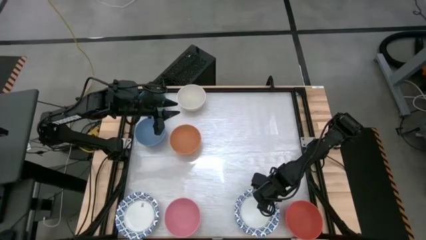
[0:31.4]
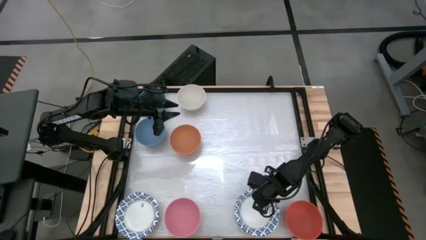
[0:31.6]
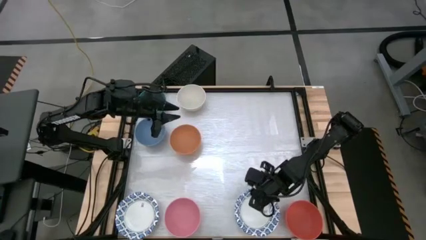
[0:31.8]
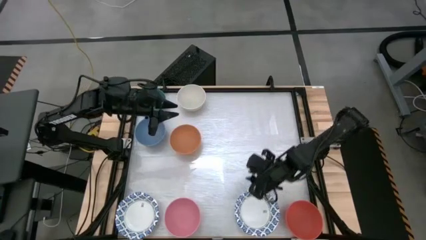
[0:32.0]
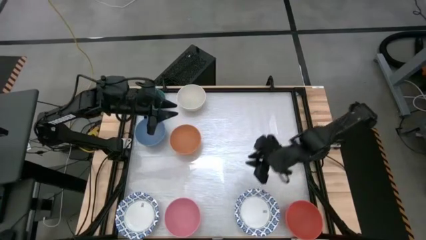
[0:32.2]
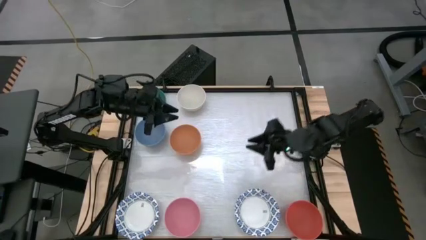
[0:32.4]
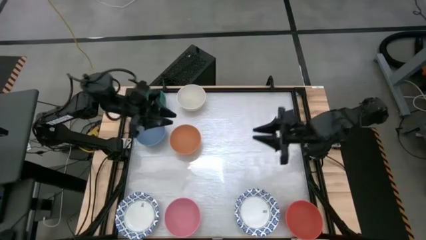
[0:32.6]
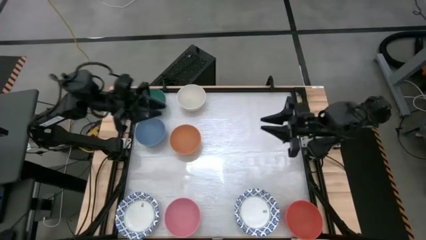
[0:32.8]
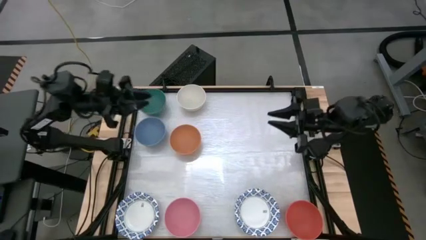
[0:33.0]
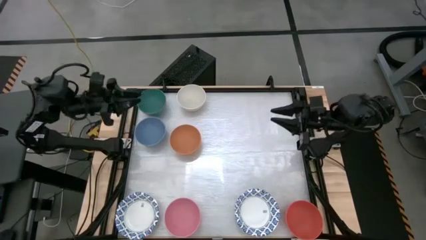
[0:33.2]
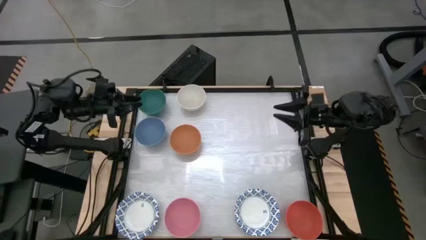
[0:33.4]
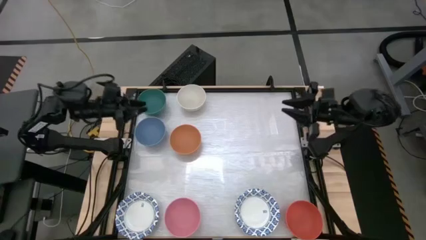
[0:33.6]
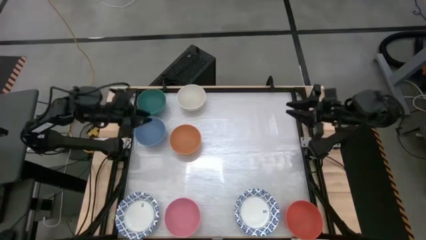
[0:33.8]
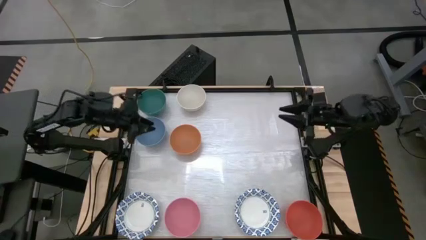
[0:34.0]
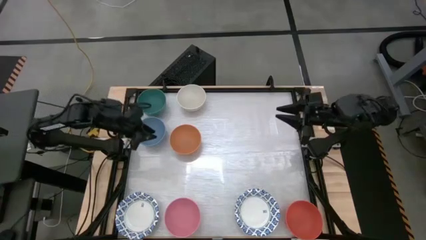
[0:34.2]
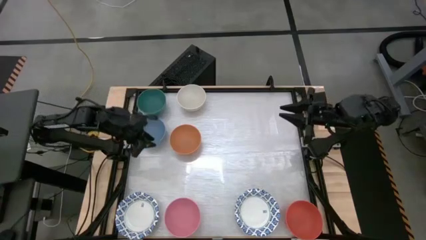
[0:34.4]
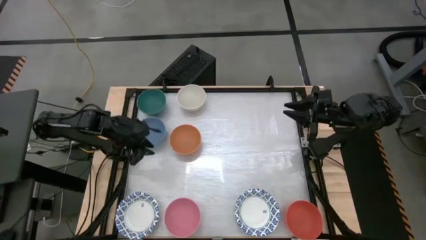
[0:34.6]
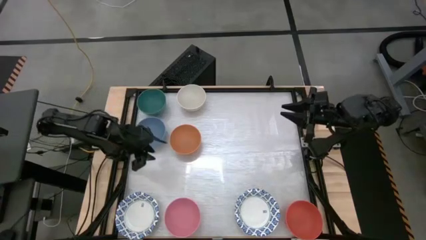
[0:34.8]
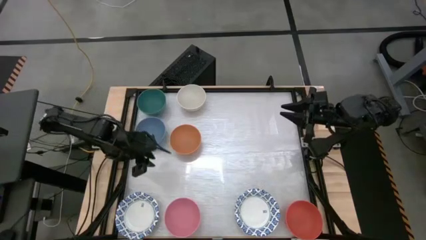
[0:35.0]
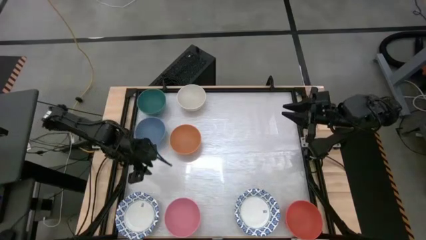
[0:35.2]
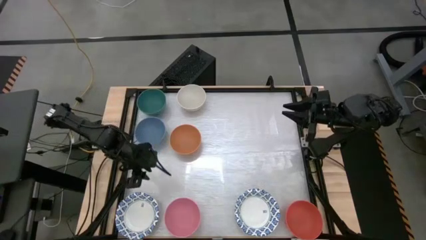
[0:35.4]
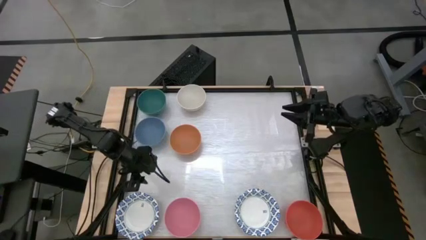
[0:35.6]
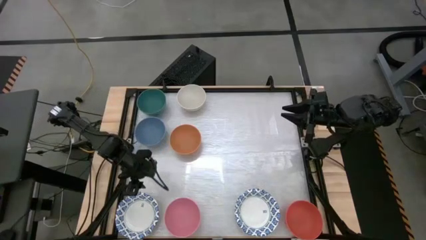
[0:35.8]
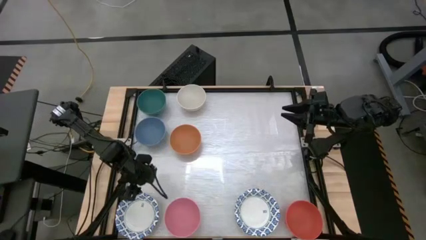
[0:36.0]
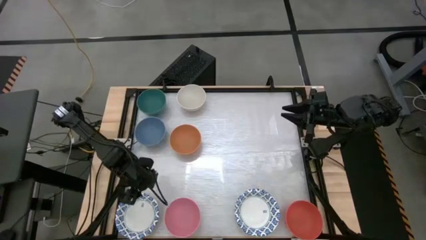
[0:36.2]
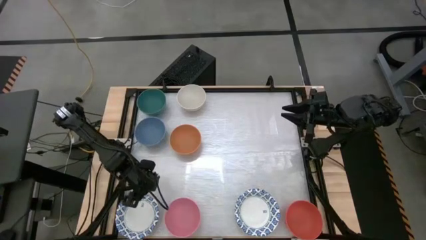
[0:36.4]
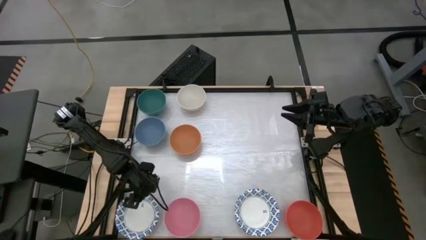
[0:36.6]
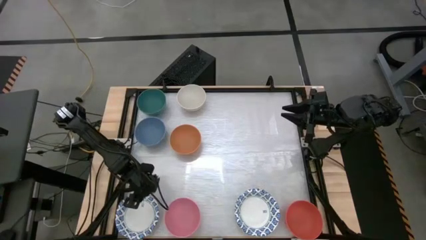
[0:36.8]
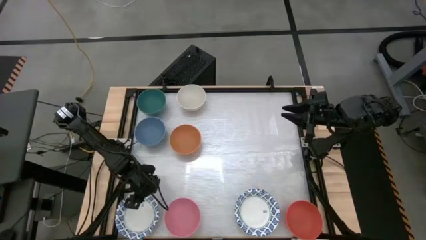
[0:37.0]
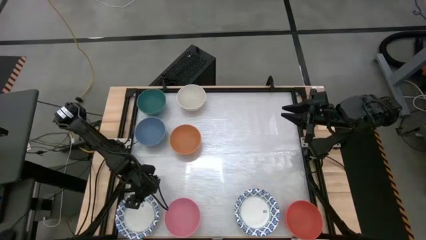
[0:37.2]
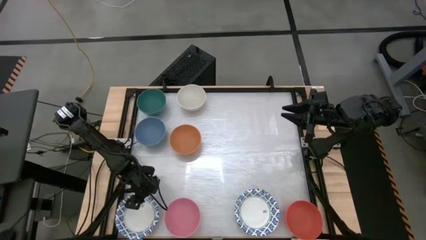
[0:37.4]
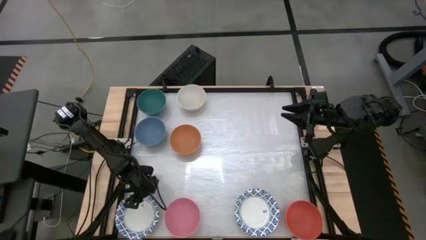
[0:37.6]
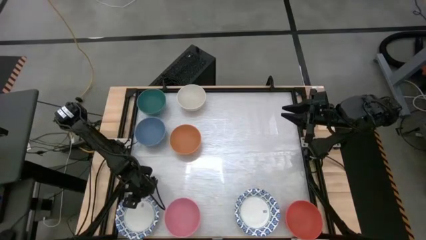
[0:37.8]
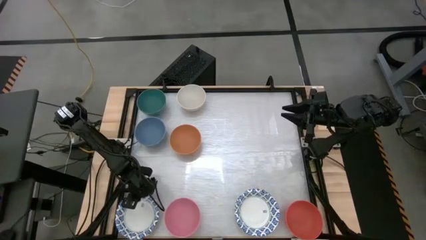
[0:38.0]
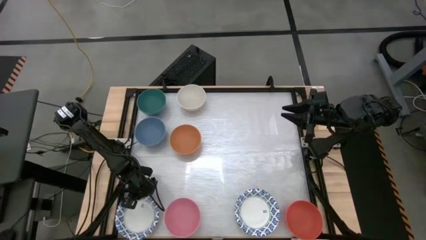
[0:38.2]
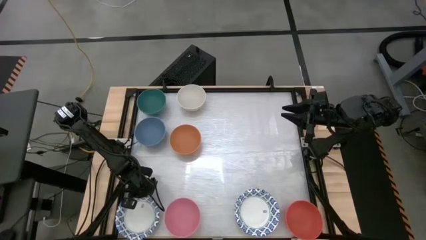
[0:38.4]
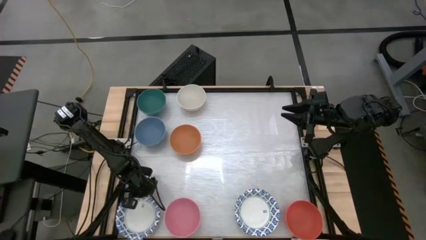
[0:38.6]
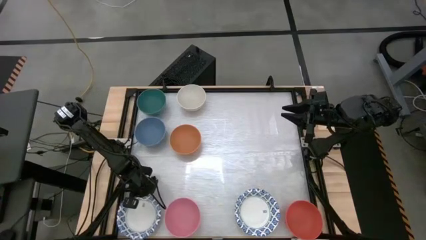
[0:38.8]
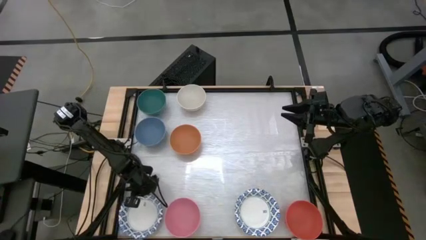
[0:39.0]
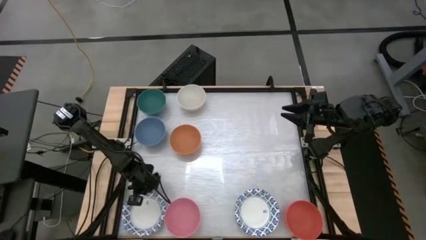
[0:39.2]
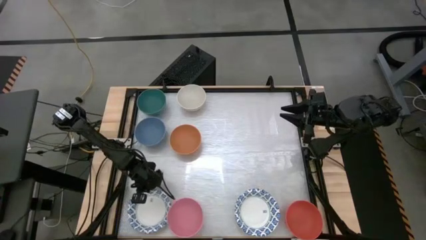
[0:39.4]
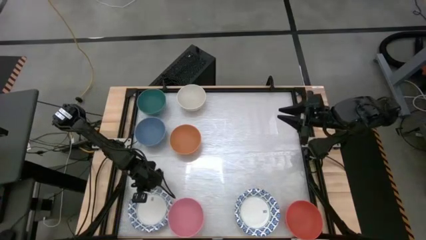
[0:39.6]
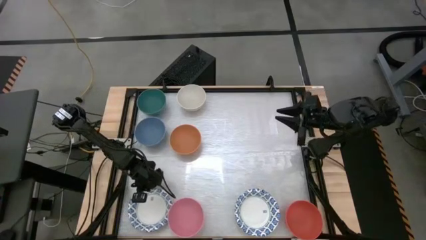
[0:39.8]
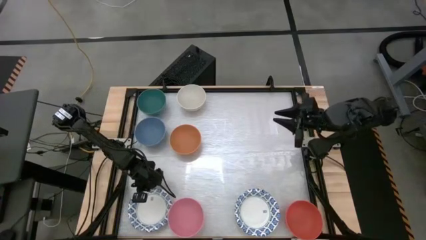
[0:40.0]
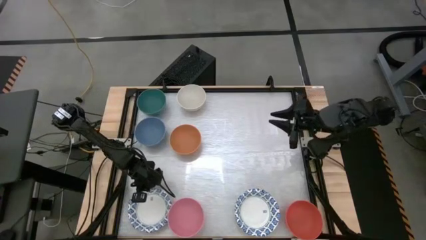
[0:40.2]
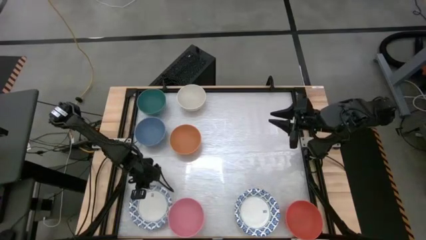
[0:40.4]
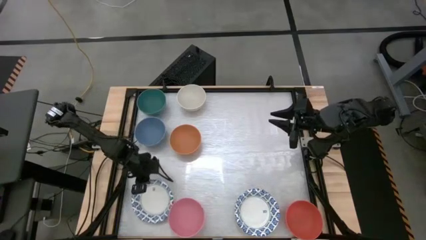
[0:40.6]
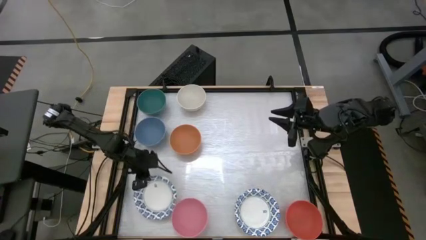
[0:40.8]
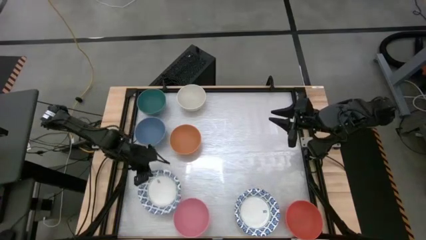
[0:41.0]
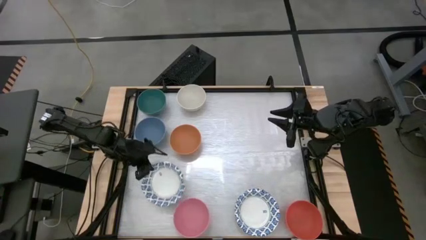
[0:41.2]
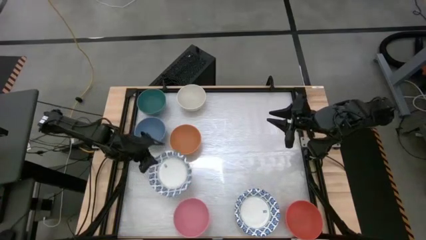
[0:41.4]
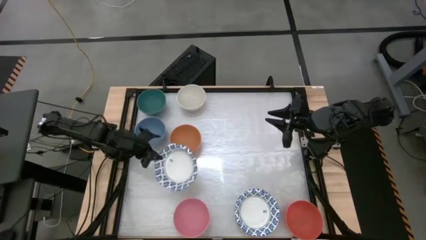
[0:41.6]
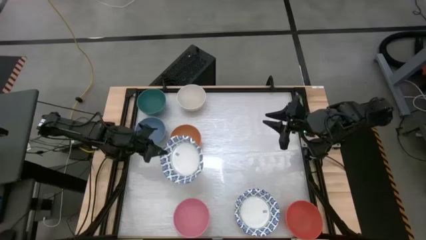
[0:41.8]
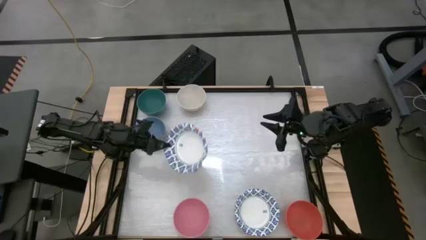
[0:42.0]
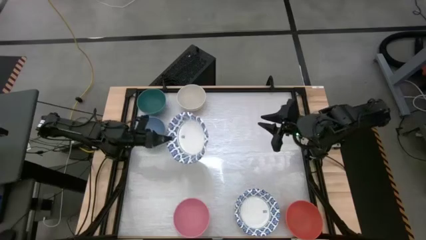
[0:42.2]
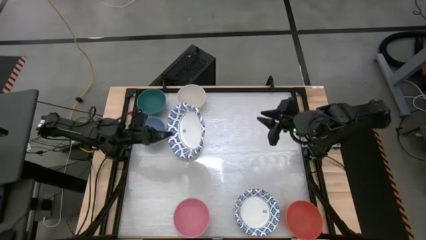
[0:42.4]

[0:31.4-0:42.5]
Stack the left white paper bowl on top of the right white paper bowl

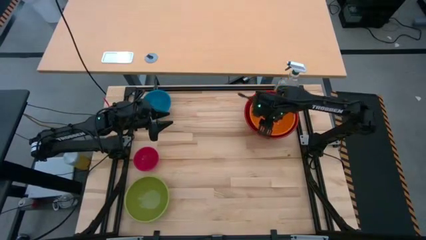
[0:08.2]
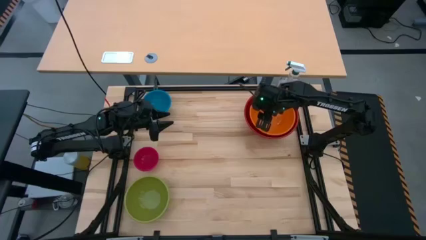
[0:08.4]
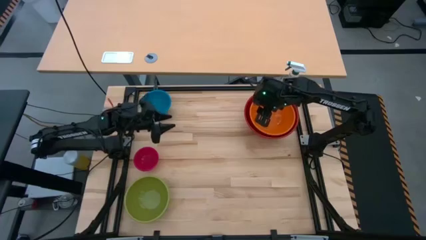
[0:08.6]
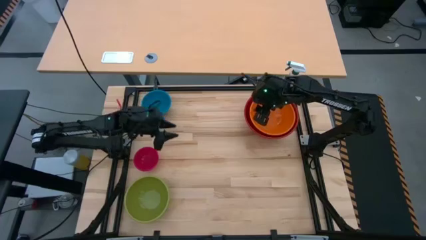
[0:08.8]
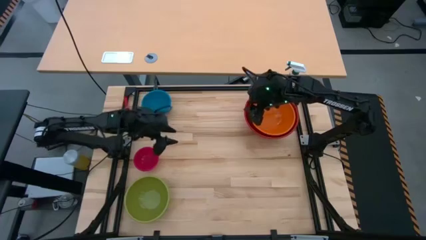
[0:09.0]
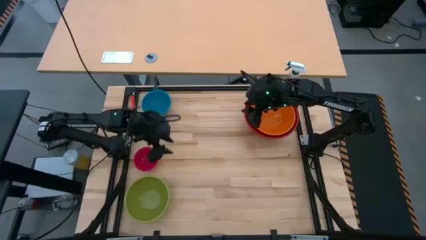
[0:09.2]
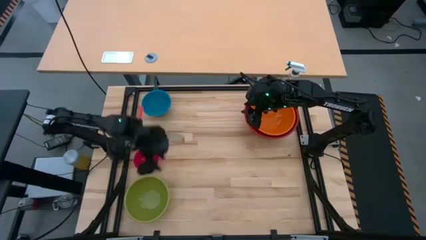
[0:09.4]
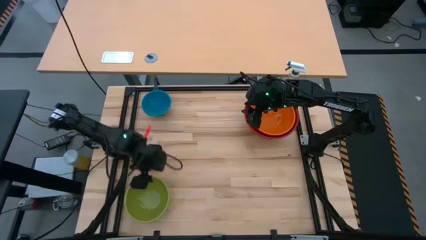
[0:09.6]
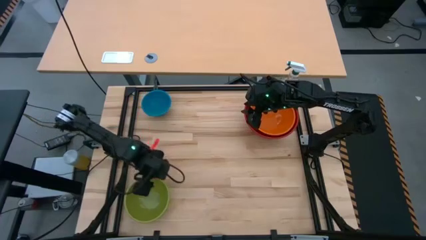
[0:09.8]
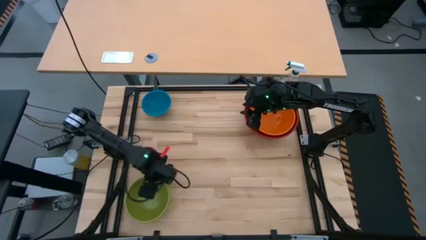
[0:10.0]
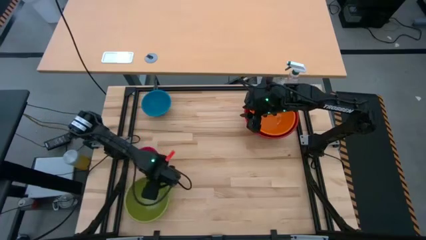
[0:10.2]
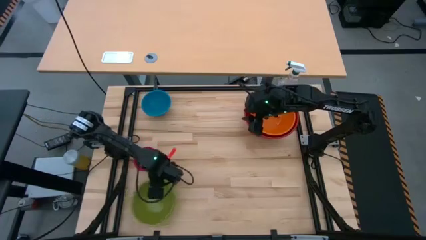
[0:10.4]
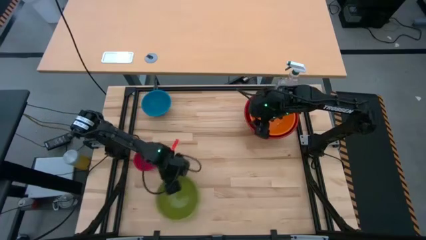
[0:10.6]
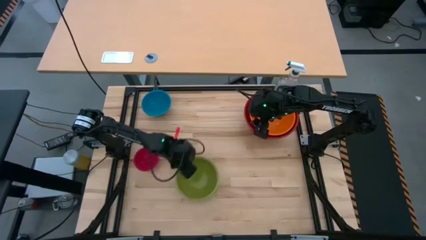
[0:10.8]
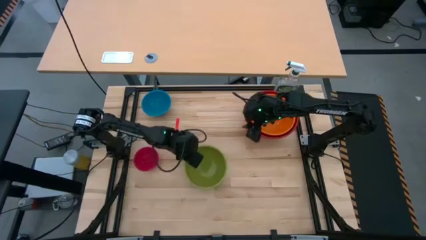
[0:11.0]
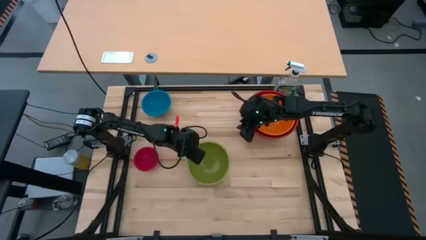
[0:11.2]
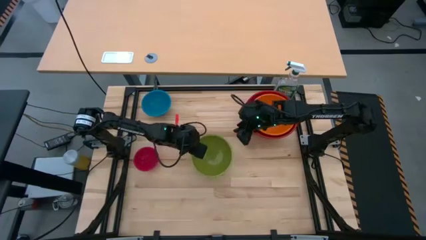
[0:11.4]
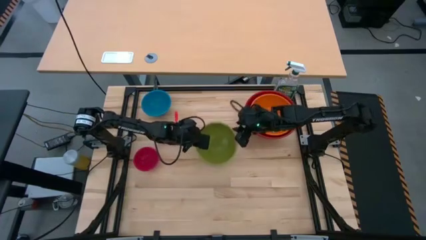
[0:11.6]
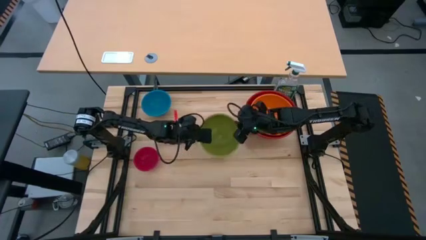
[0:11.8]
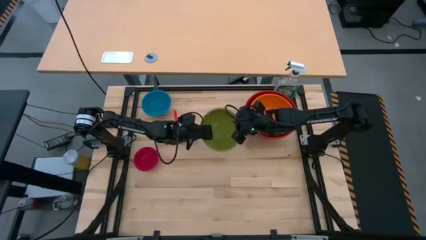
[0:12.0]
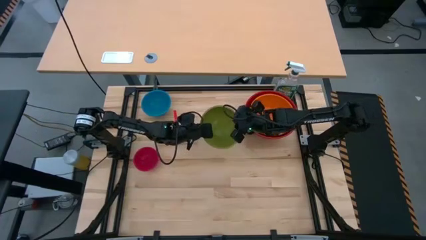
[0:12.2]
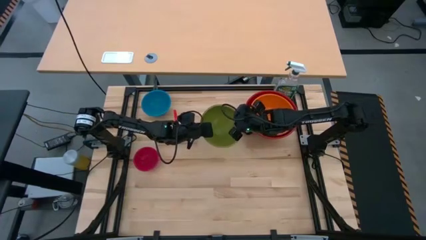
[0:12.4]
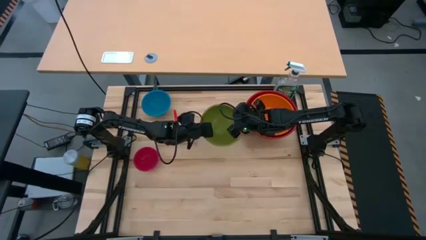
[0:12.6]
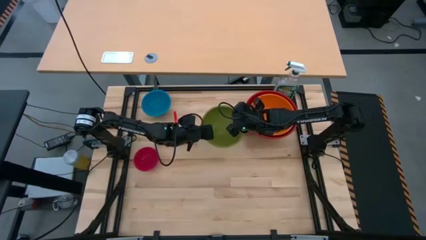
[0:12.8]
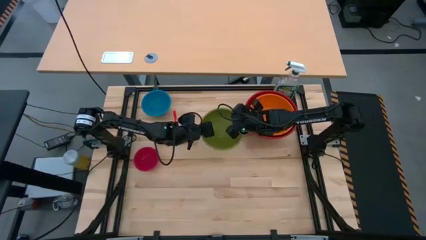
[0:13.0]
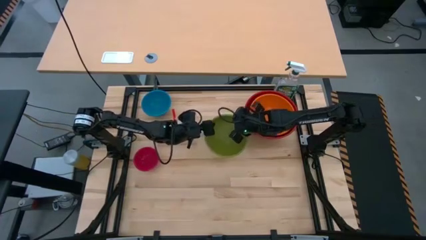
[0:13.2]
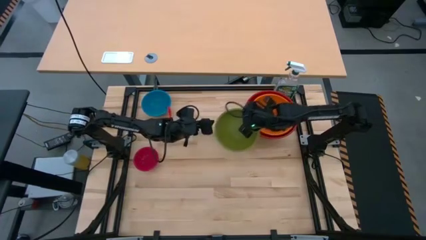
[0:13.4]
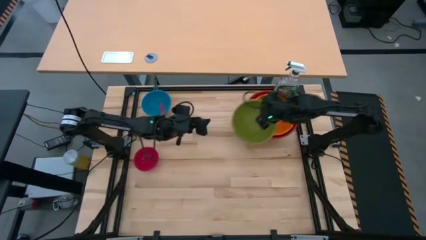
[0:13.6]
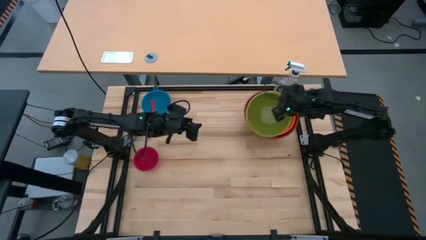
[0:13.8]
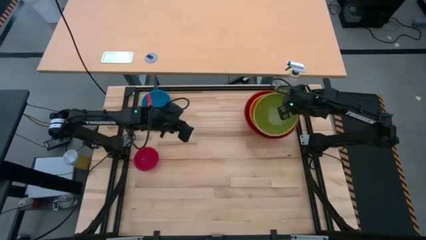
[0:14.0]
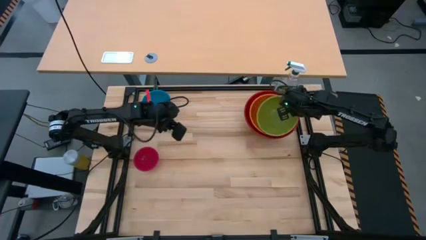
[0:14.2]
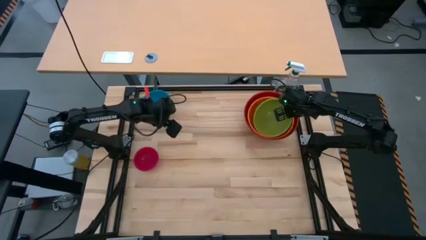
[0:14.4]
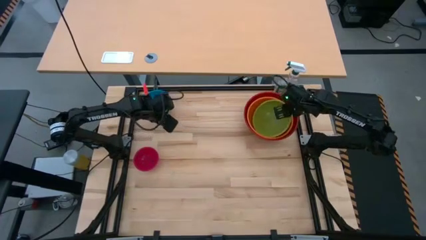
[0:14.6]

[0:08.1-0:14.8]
Stack the green bowl on the orange bowl
